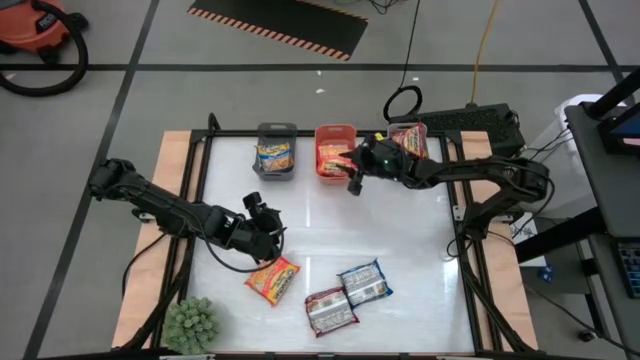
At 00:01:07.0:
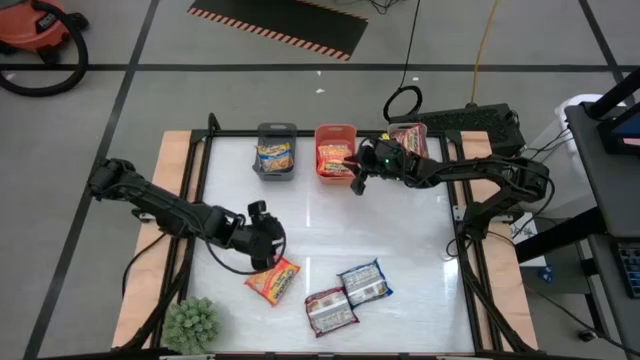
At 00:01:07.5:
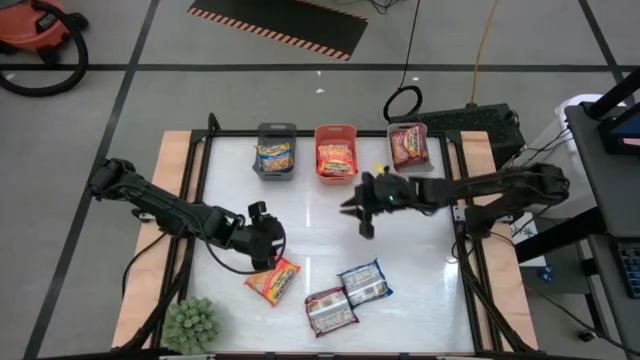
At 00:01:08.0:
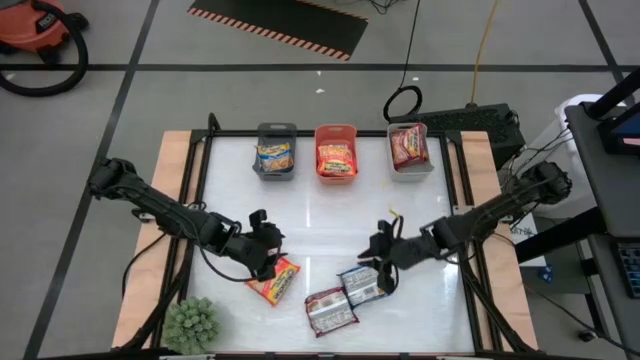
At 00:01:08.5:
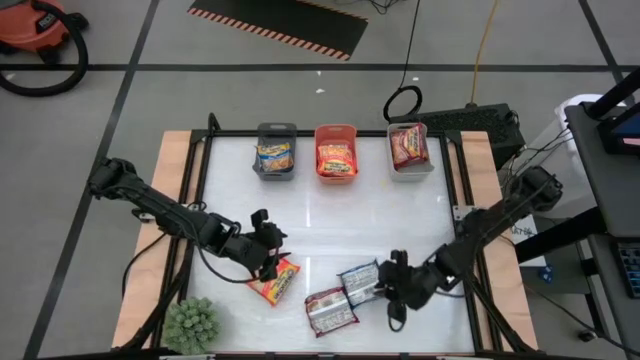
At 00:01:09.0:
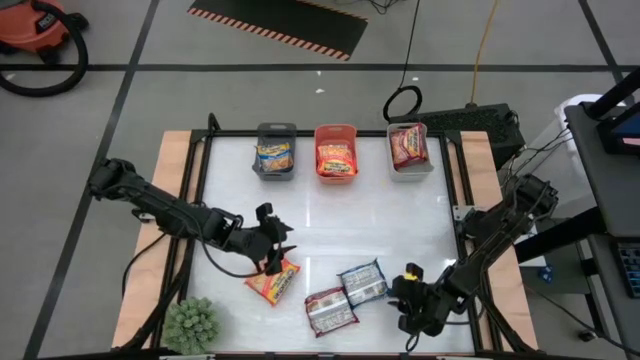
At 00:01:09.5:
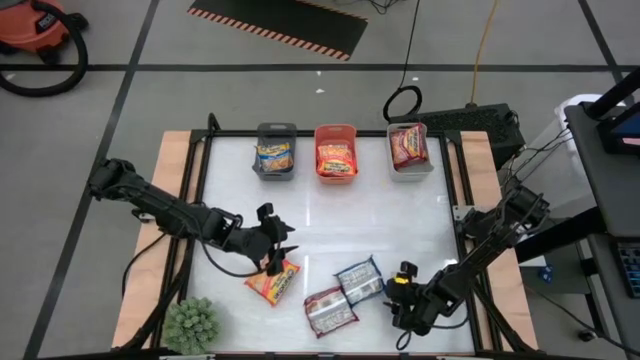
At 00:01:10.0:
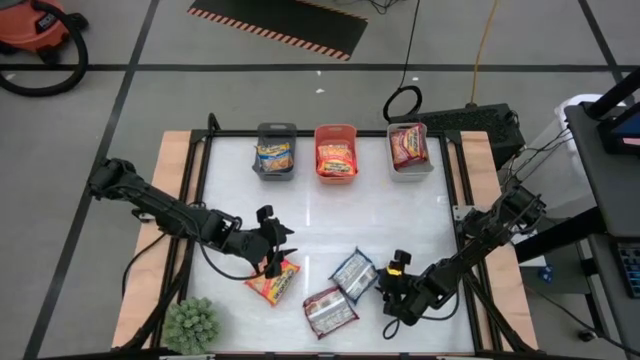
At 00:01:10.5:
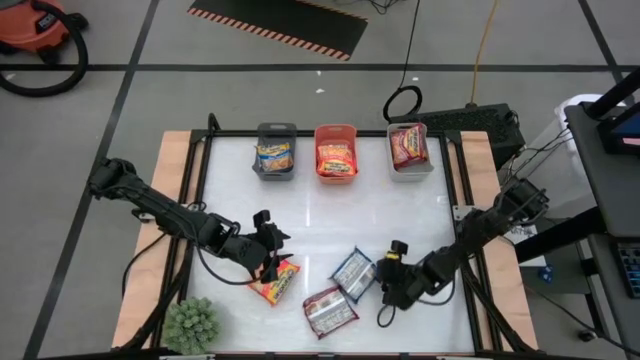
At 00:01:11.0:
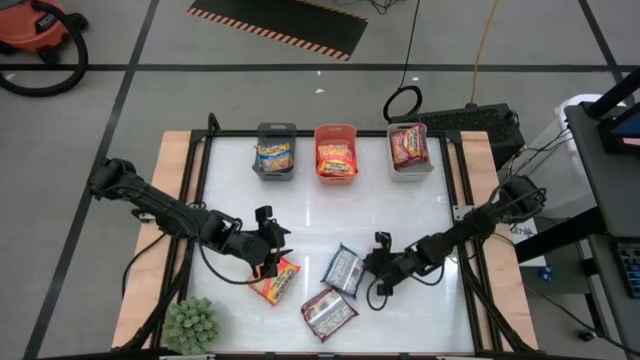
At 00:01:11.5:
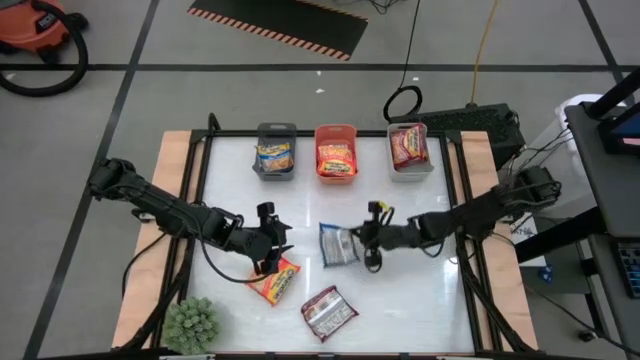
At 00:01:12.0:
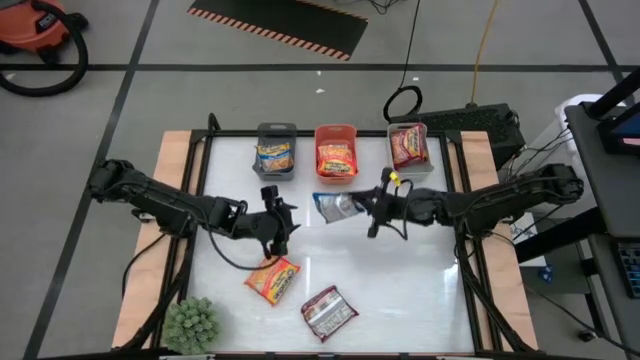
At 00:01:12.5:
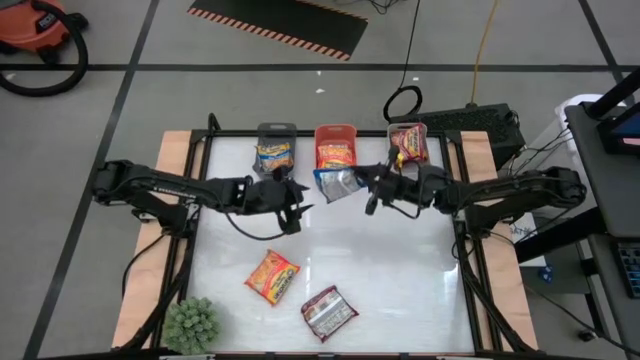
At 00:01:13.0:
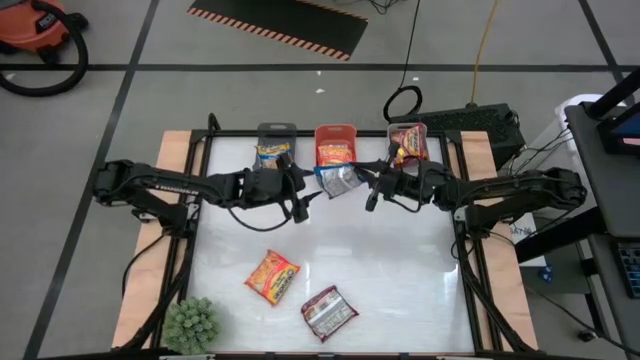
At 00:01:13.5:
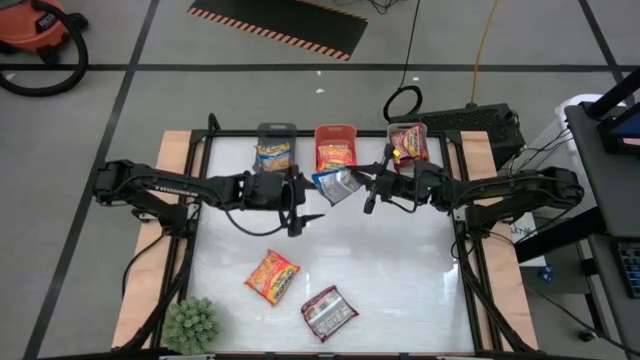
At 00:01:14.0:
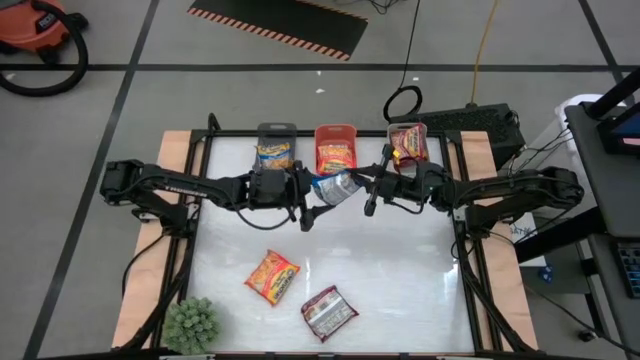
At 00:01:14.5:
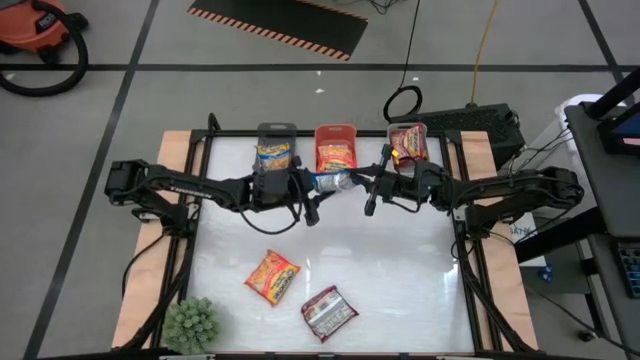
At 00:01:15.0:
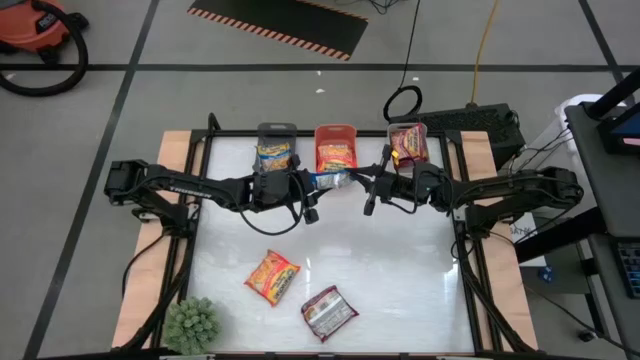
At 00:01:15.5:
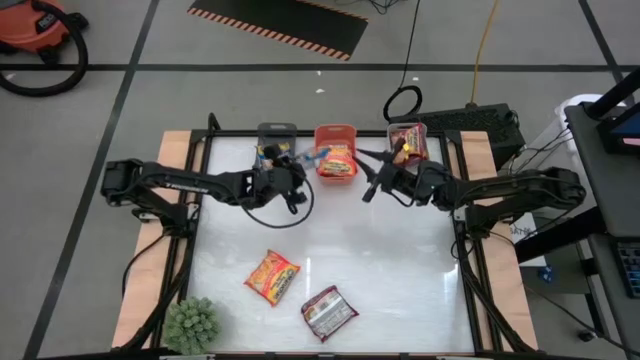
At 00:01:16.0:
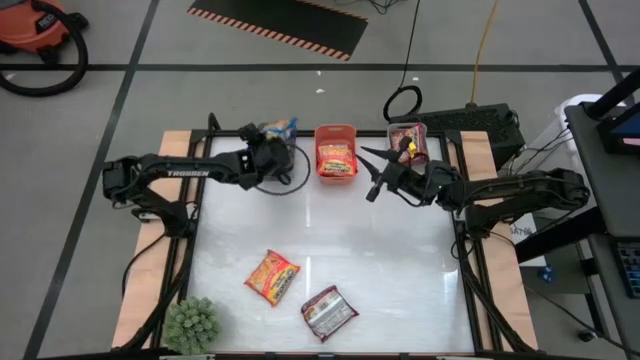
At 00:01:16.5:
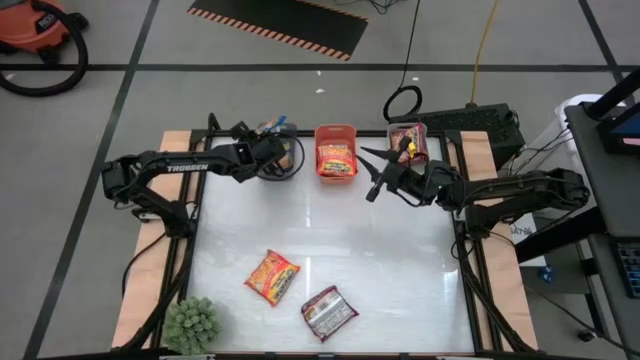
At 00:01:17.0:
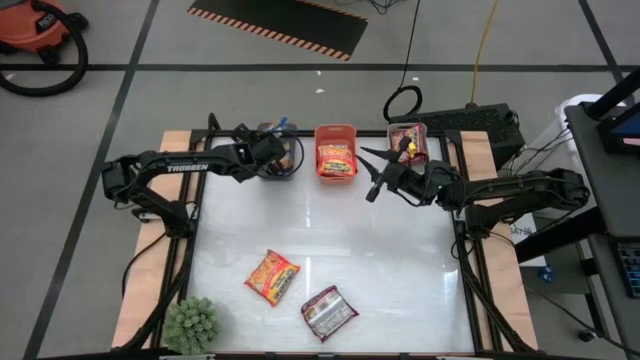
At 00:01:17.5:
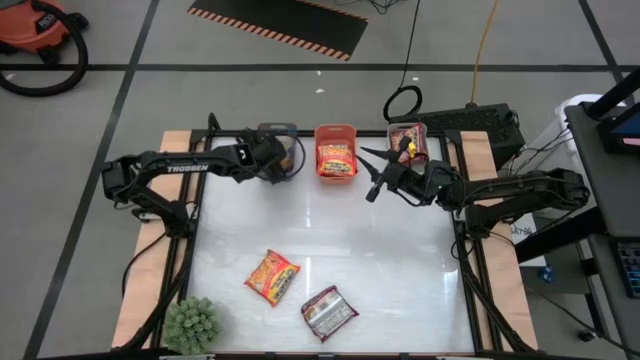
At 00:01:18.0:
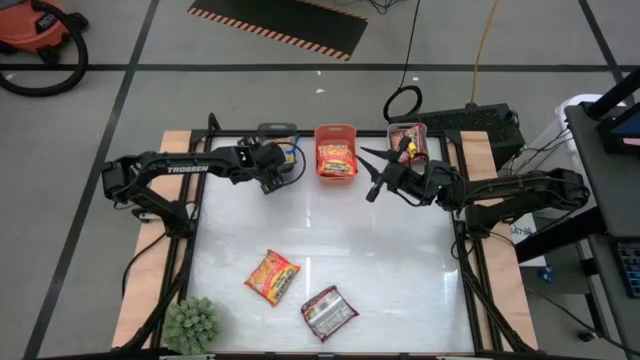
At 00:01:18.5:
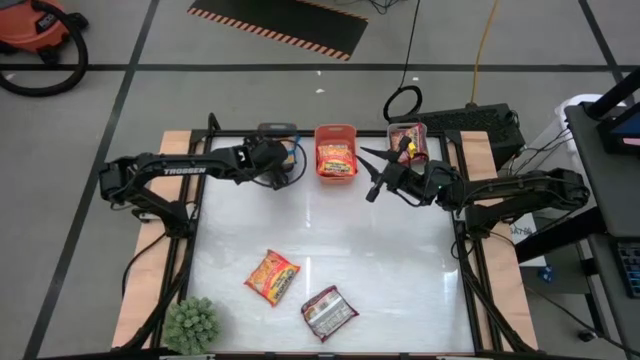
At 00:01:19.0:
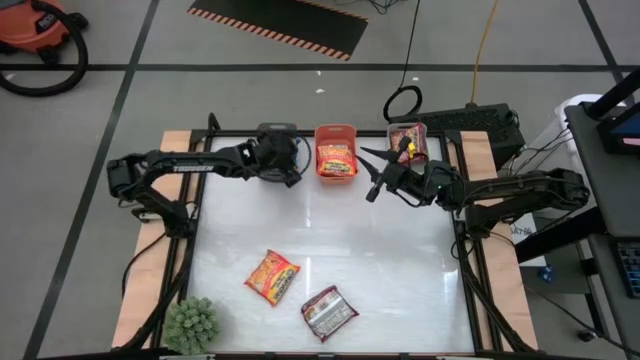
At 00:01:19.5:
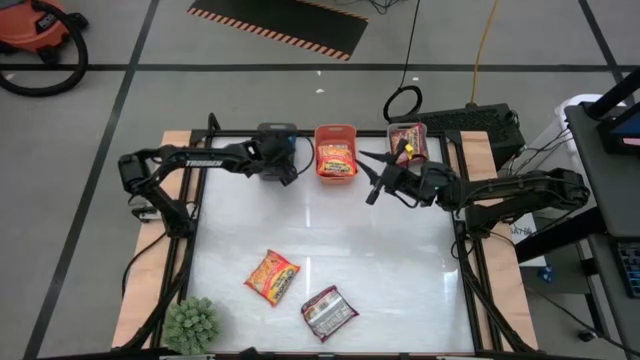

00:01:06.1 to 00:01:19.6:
Task: Sort Maruchan noodles
Put the blue noodle pack into the black bin

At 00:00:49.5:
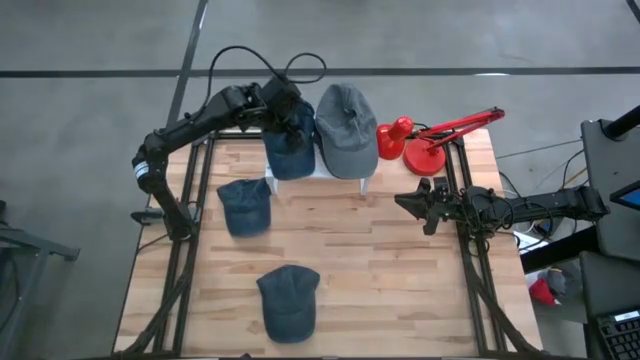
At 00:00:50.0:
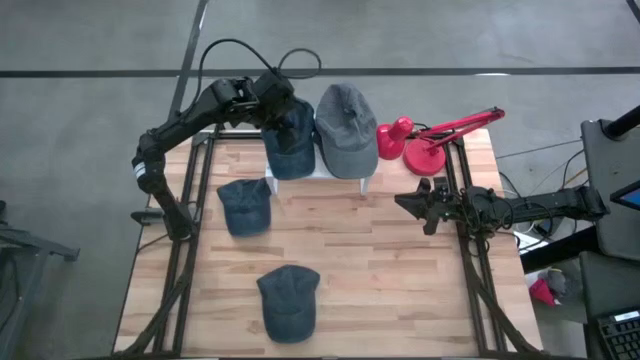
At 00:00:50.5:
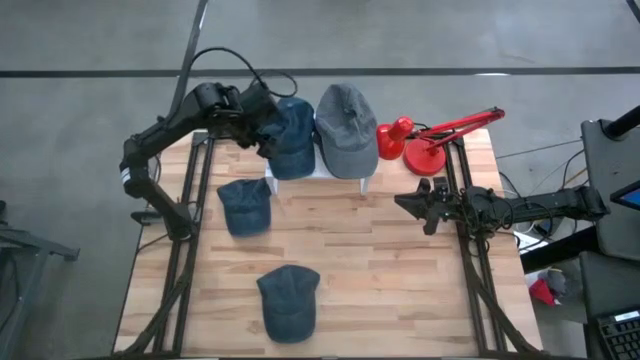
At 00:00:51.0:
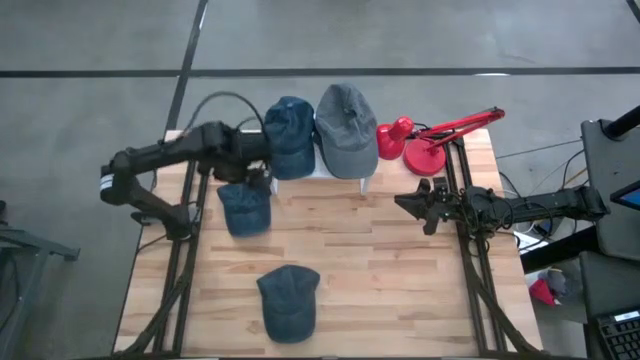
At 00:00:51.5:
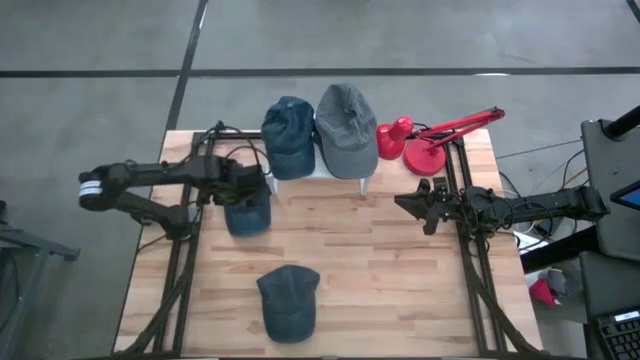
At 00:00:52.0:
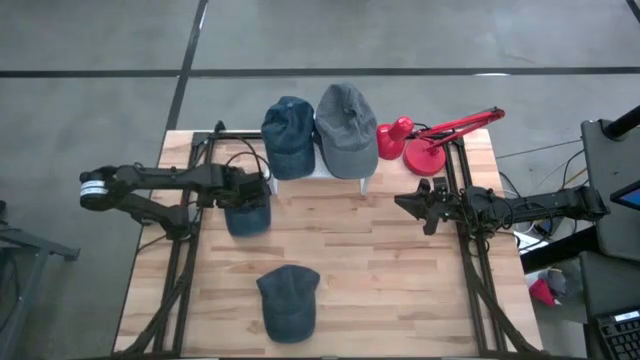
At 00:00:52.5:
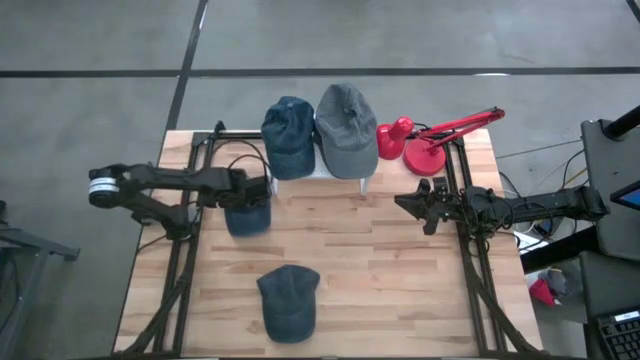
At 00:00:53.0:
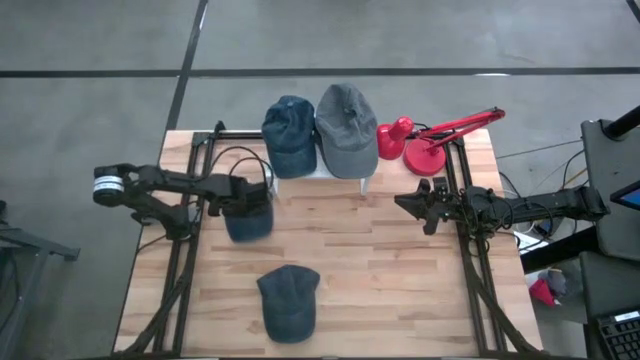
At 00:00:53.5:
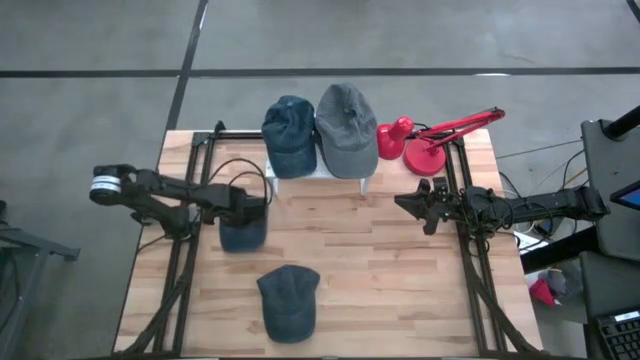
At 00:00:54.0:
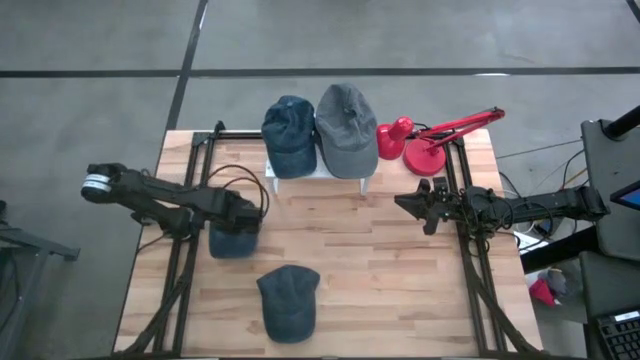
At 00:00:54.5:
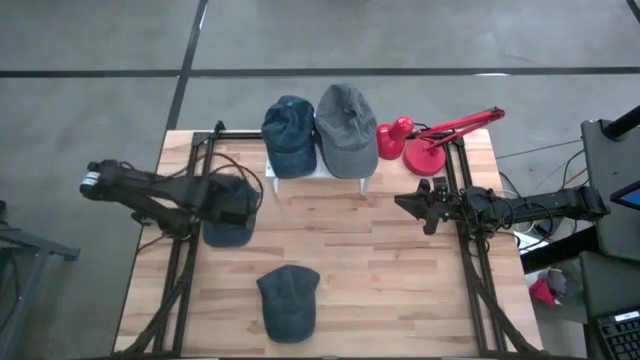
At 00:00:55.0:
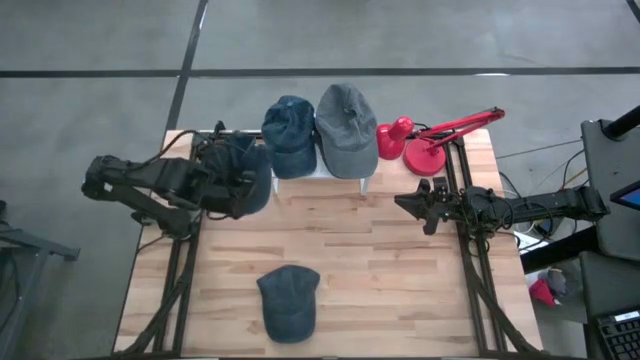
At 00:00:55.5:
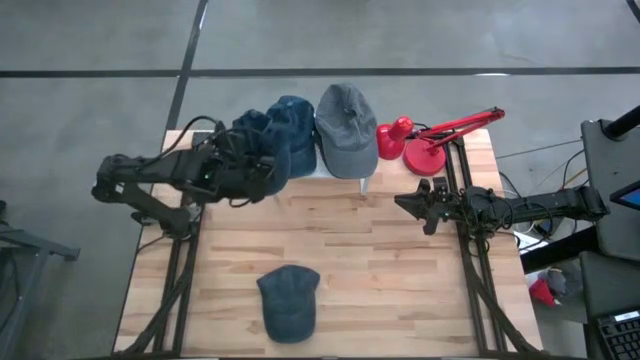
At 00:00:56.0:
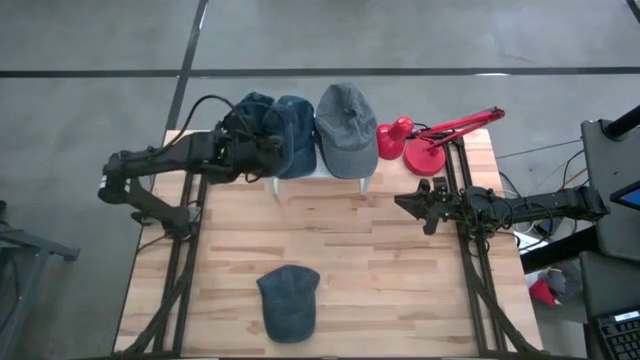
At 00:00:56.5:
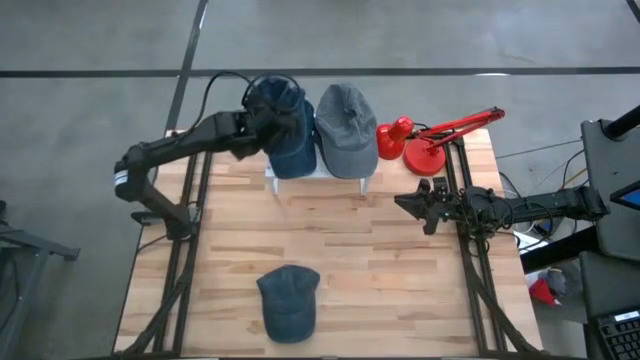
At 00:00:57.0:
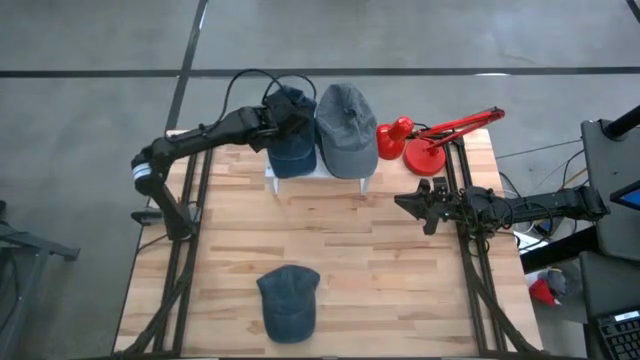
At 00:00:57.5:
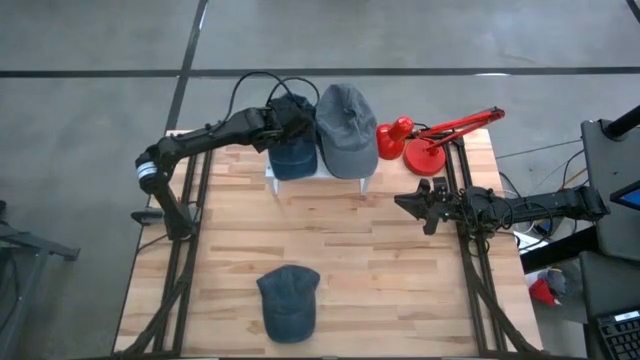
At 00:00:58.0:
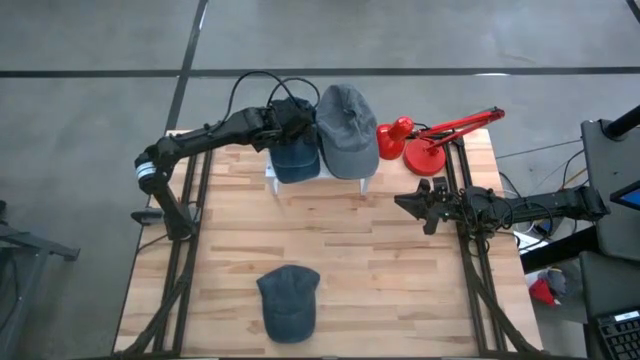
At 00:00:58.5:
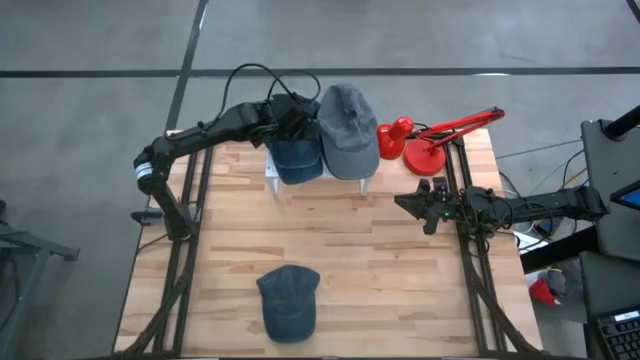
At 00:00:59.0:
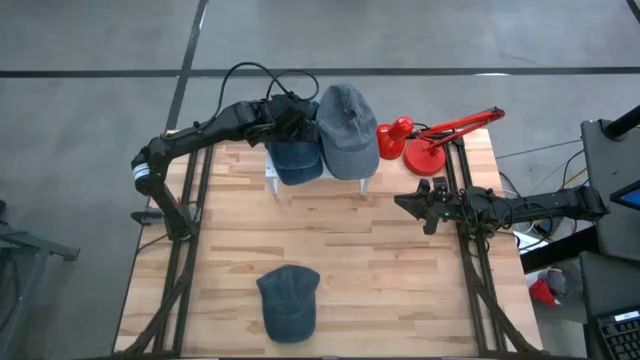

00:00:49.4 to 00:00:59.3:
Task: Pick & Place hat
Stack the top blue cap on top of the other blue cap on the shelf
